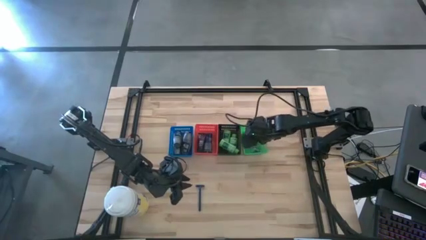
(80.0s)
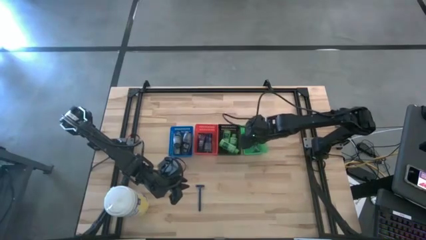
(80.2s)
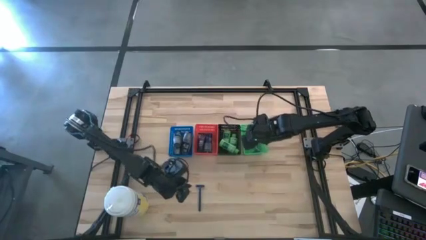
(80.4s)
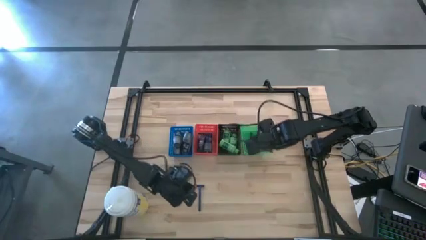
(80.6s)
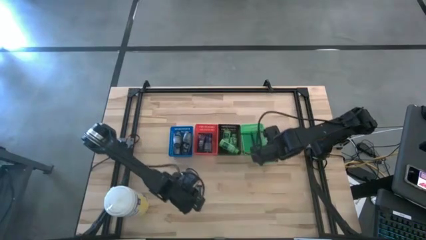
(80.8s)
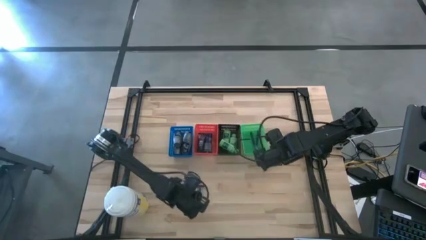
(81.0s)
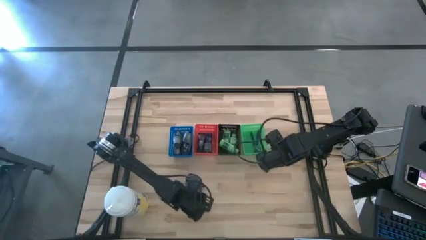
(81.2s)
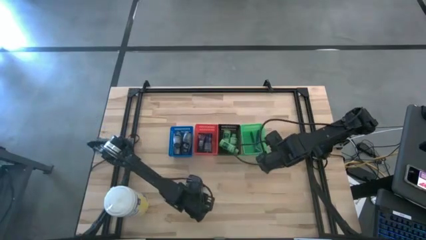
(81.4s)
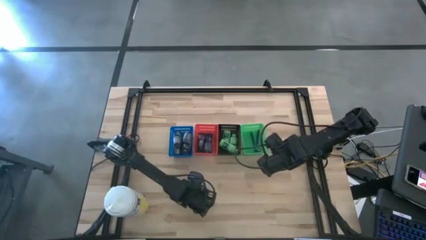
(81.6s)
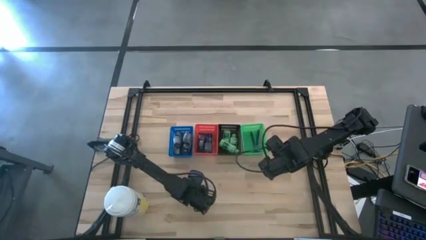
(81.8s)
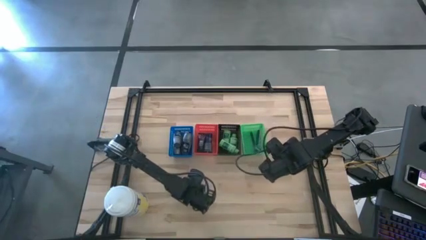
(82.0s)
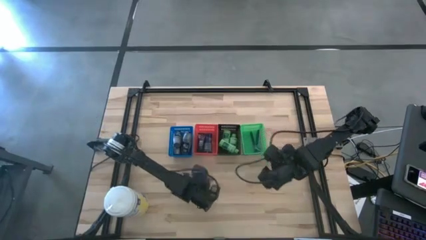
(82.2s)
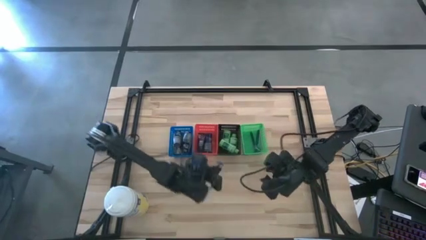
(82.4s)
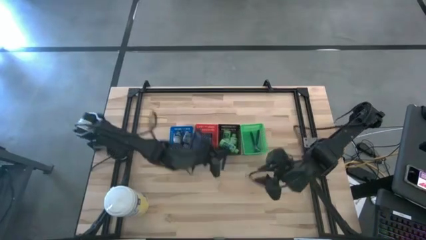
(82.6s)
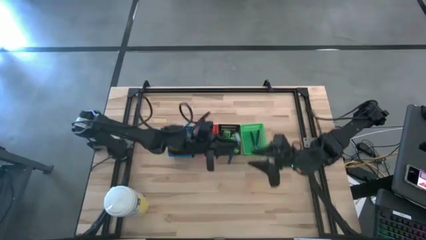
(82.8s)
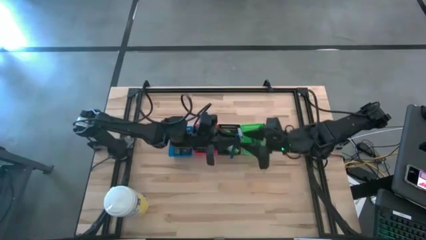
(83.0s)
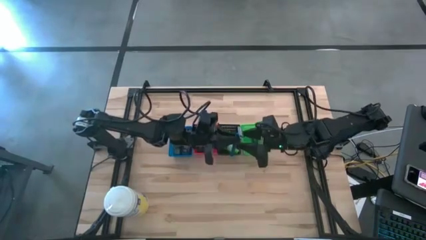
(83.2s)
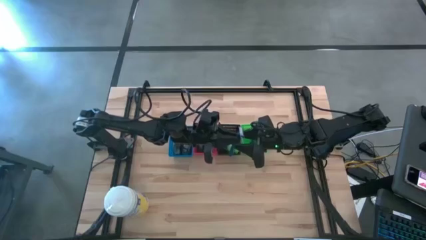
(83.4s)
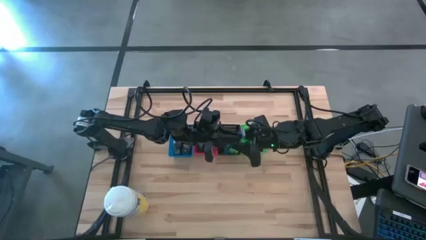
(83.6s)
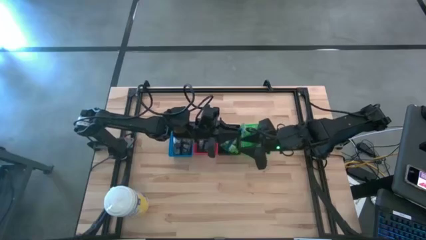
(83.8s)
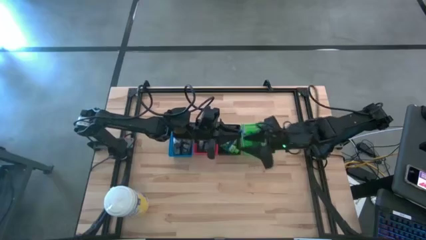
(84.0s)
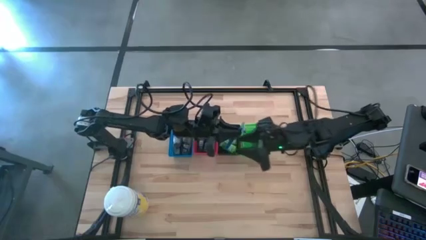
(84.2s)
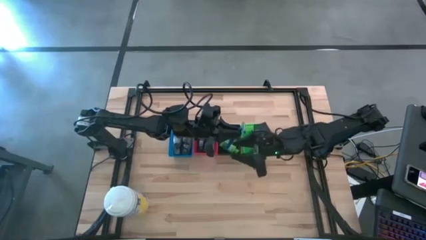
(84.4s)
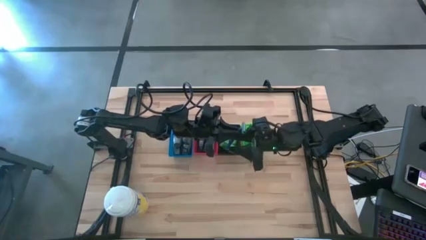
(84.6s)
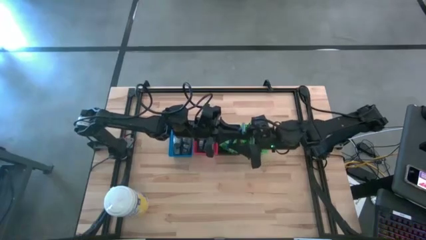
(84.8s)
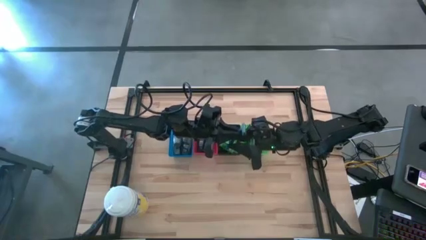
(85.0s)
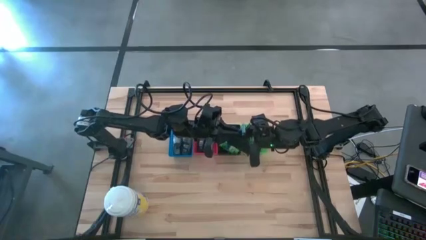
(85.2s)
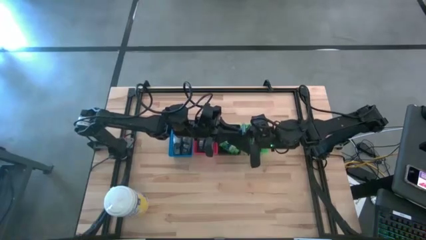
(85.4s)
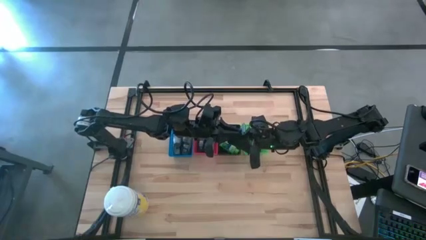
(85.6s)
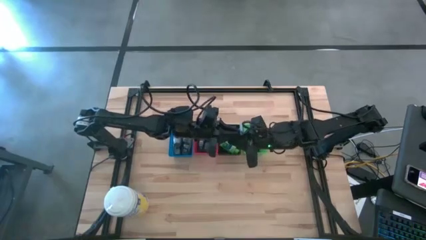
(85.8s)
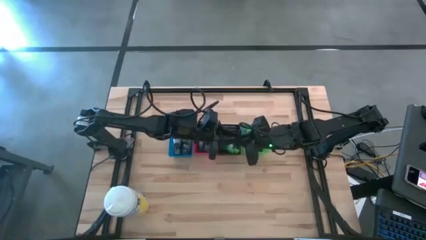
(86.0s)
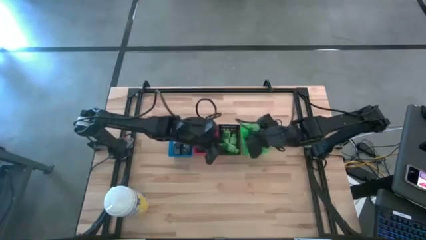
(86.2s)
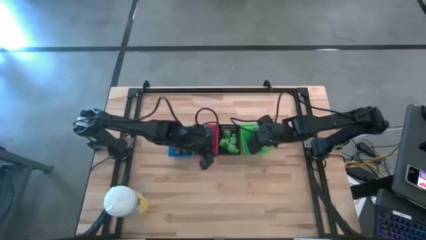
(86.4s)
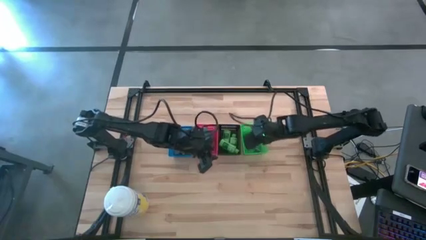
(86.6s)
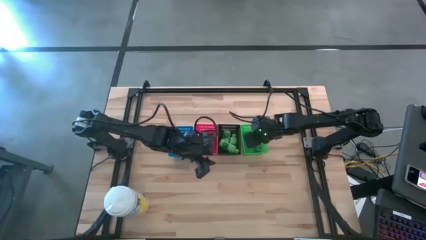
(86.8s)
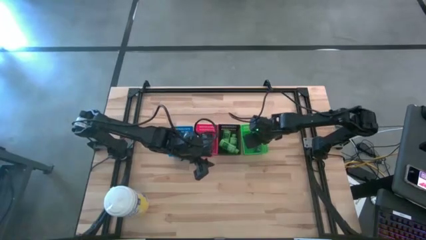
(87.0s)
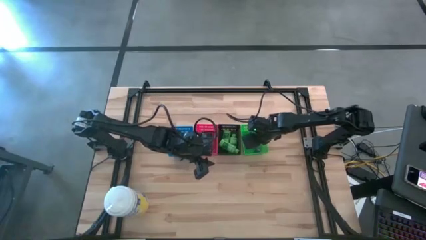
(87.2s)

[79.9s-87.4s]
Task: Pick & Place Travel size toiletries
Put the razor into the green bin

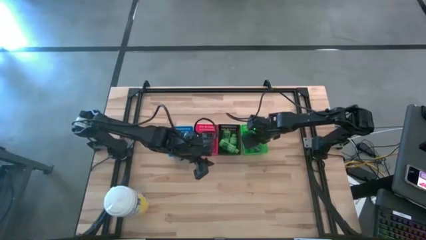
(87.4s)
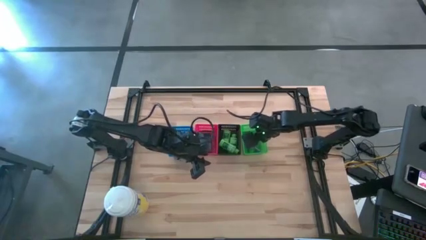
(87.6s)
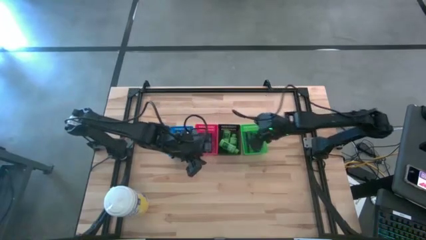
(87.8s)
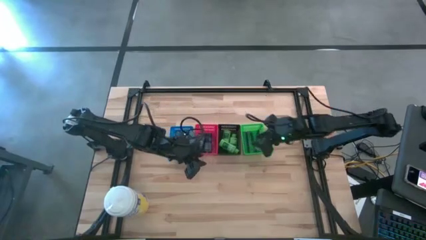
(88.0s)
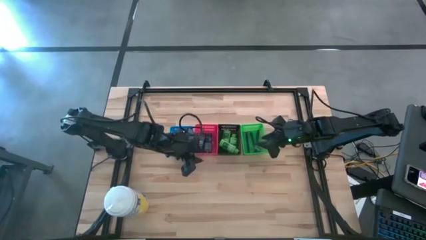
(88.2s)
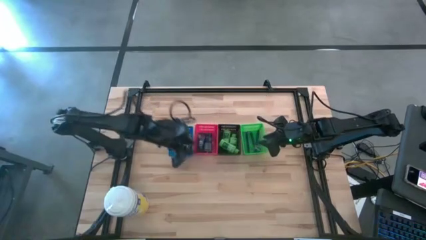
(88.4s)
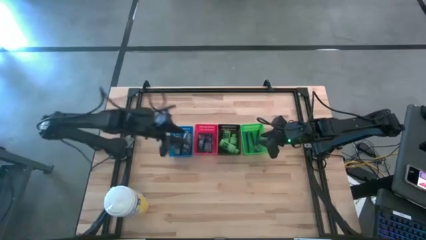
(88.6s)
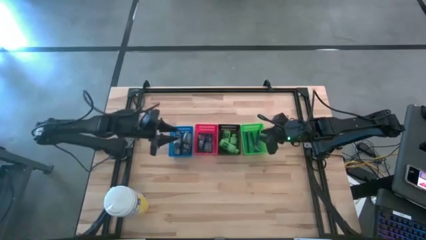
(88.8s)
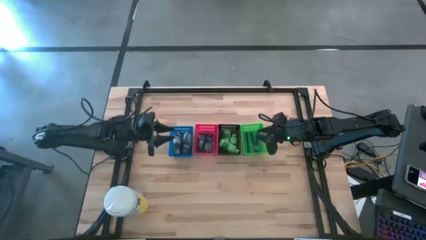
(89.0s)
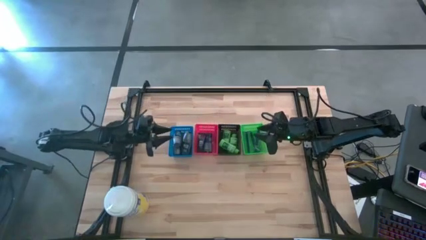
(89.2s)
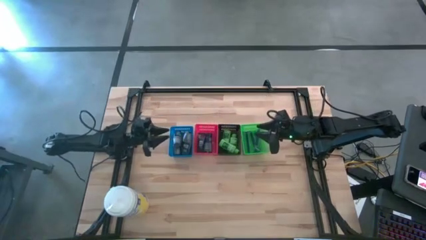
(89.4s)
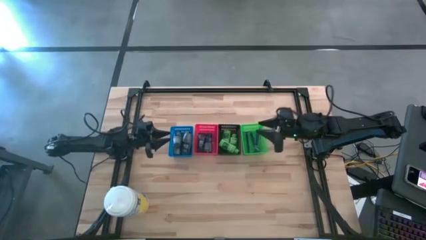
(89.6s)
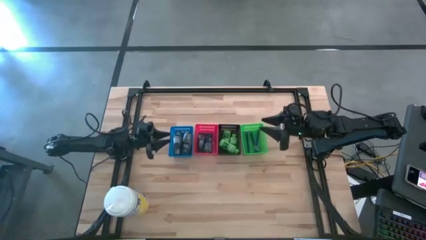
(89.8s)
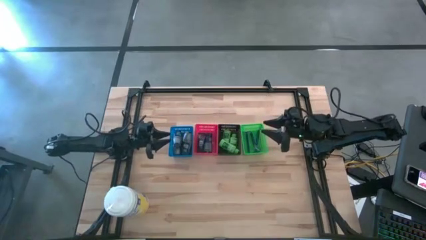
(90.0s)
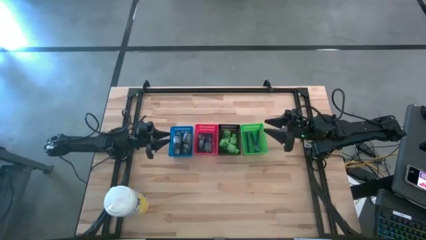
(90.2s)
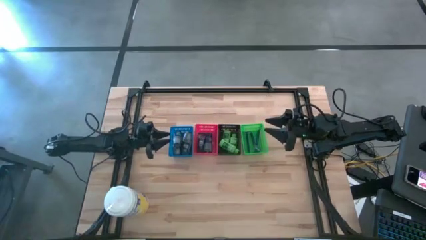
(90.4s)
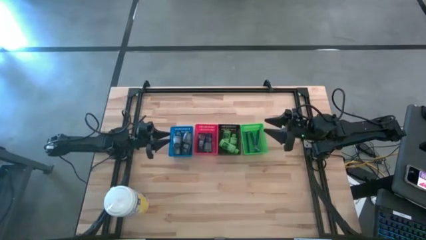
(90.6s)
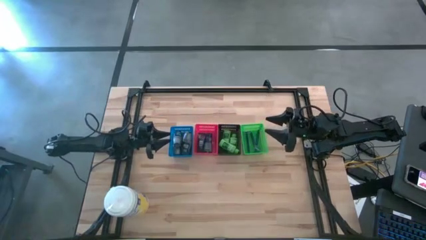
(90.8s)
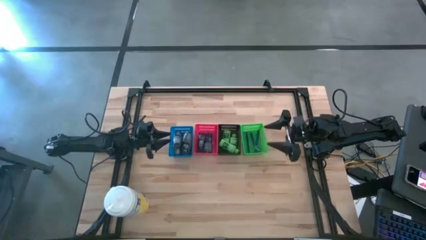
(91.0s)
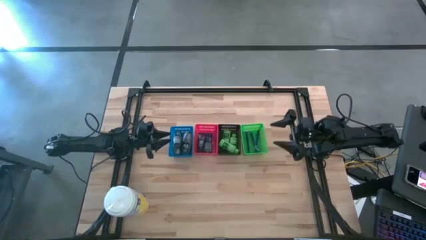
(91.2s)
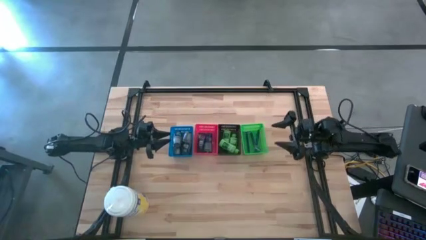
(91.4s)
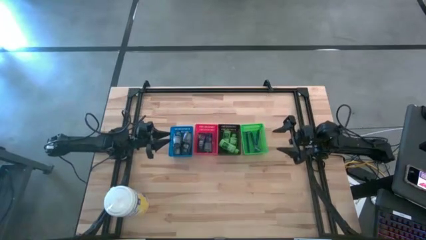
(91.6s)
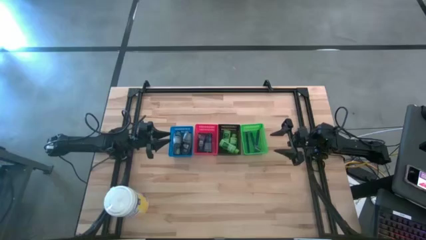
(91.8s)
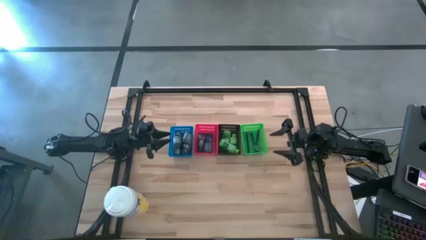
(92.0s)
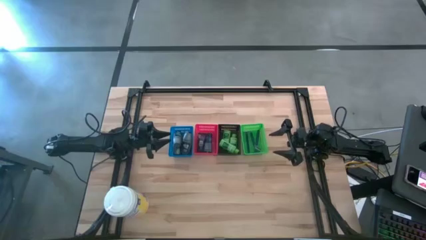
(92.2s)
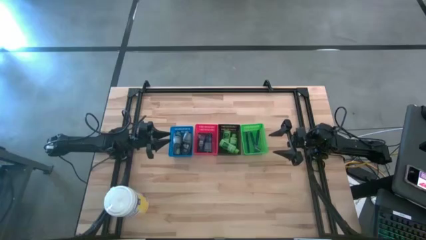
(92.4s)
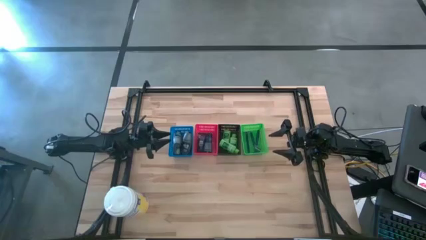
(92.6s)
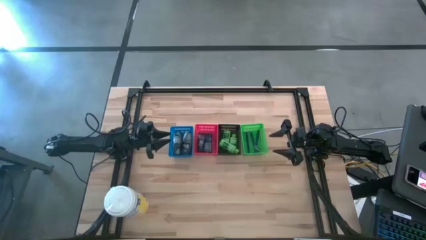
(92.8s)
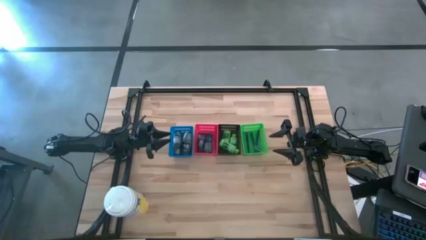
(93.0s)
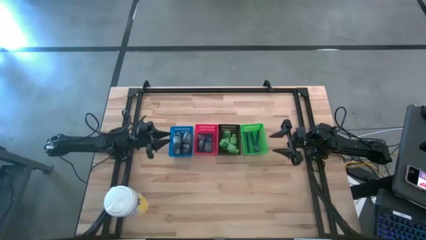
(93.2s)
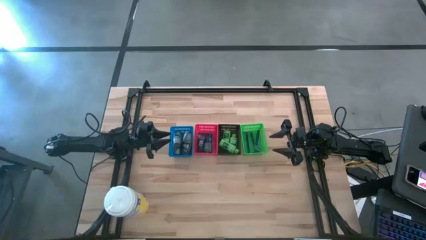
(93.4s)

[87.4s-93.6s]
Return to Home Position

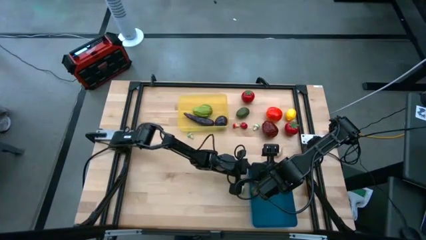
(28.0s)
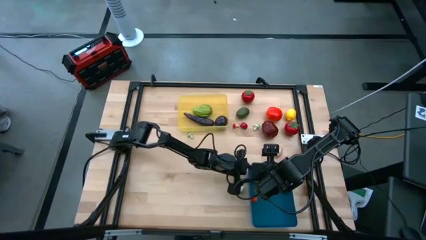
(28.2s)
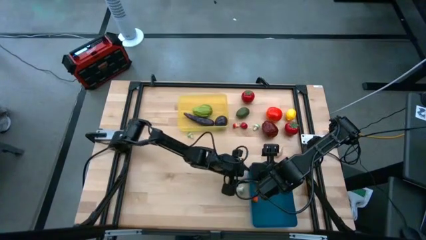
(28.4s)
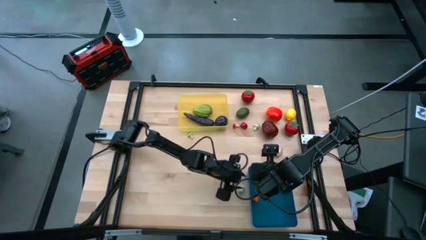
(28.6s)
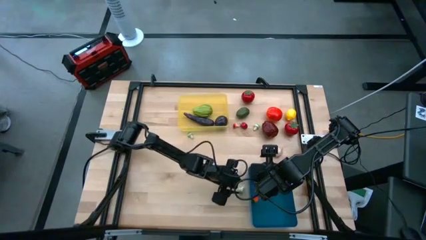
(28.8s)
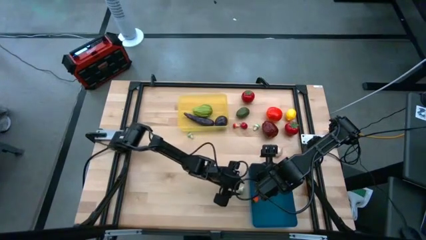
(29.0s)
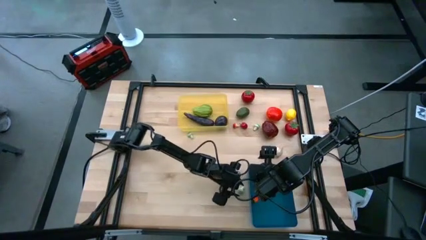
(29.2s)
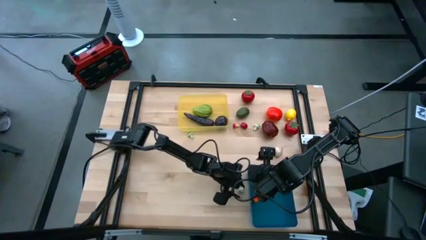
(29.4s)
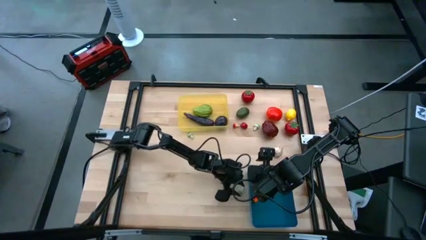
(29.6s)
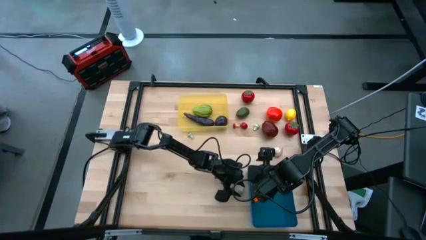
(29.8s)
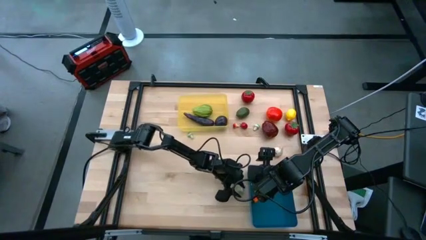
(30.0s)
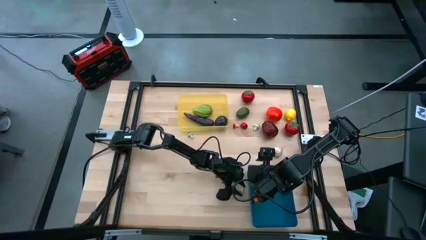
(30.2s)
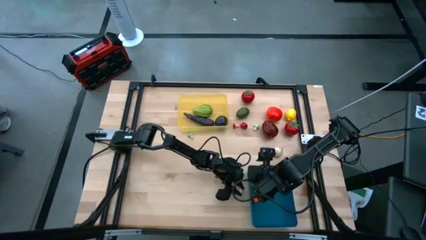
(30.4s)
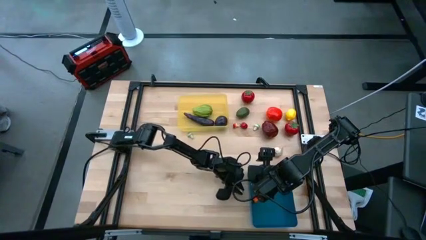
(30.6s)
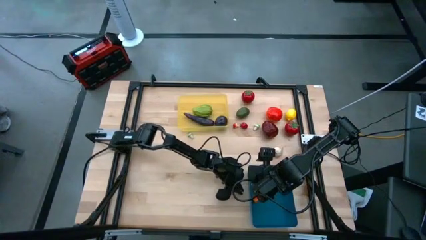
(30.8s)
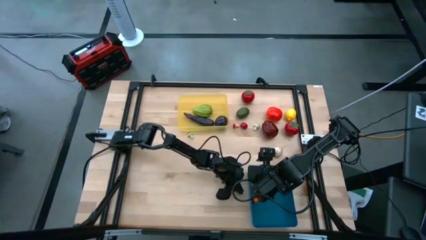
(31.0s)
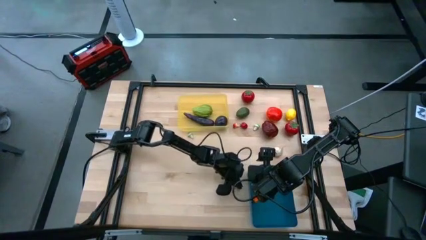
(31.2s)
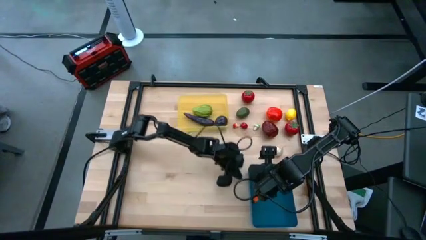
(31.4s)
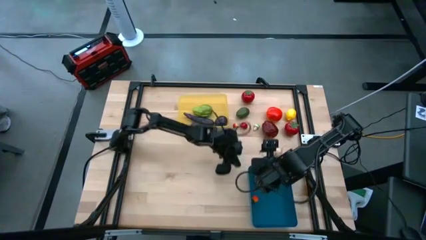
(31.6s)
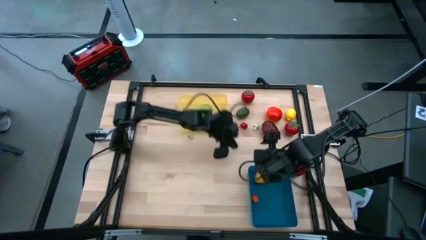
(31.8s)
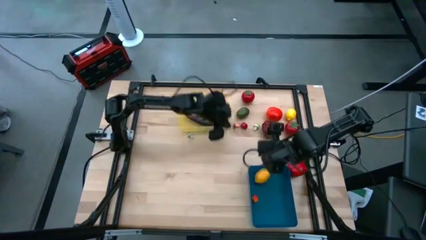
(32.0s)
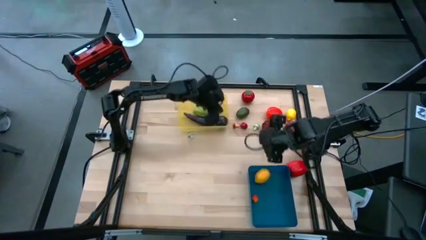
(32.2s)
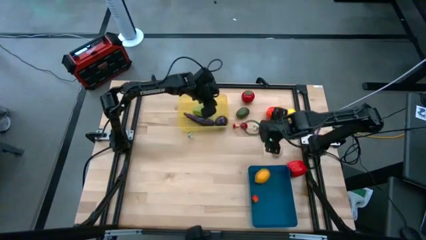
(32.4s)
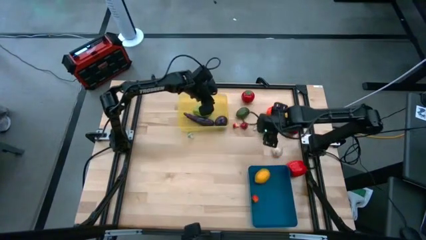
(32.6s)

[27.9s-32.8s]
Task: Sort produce into baskets
Put the green mushroom into the yellow bin
